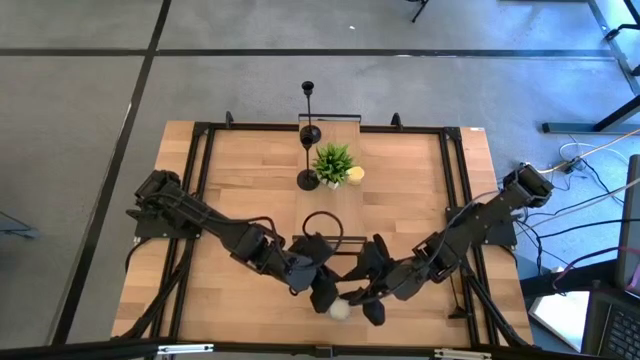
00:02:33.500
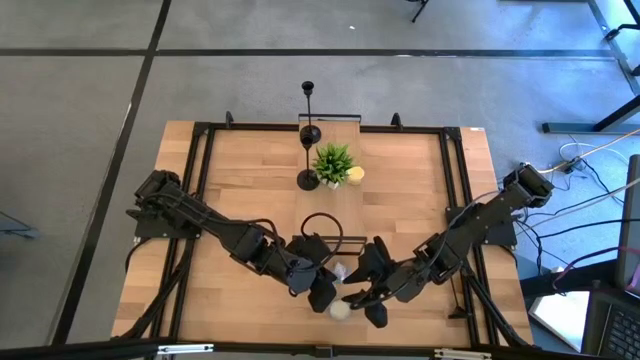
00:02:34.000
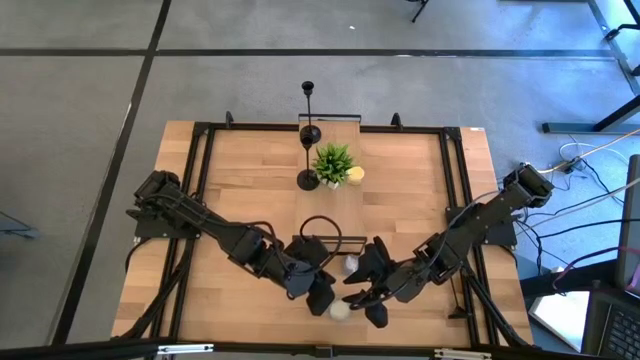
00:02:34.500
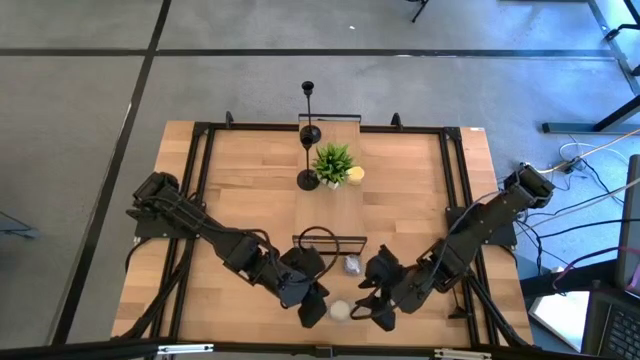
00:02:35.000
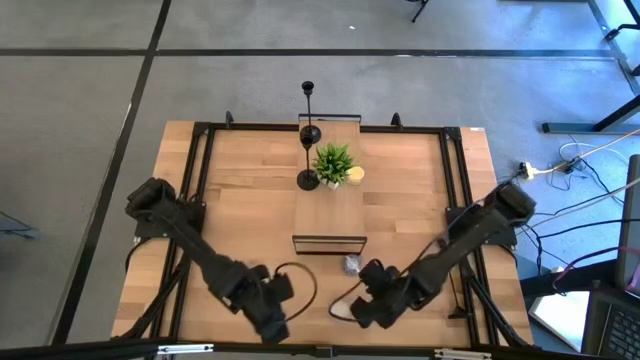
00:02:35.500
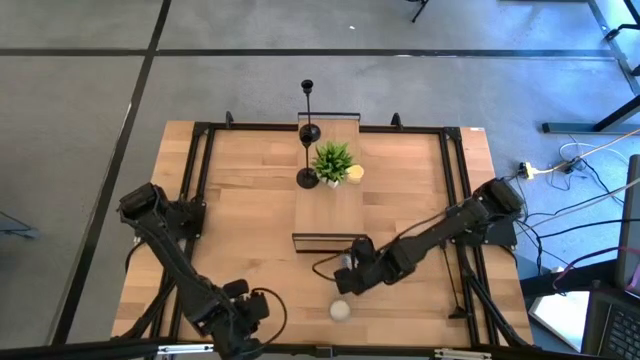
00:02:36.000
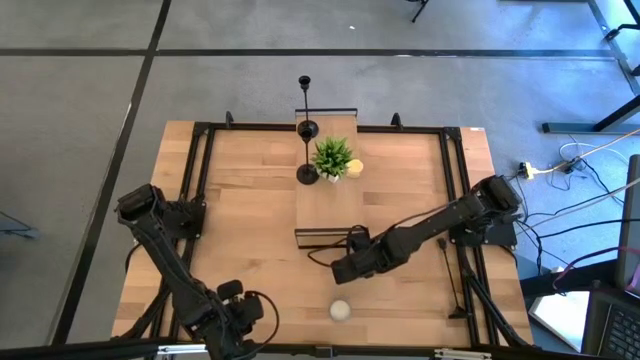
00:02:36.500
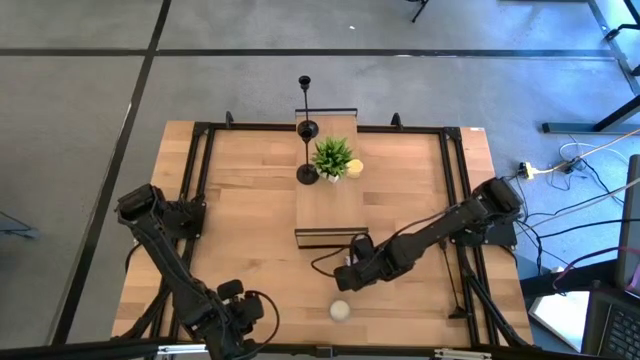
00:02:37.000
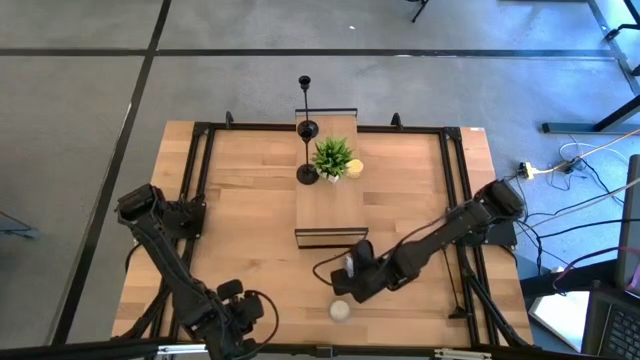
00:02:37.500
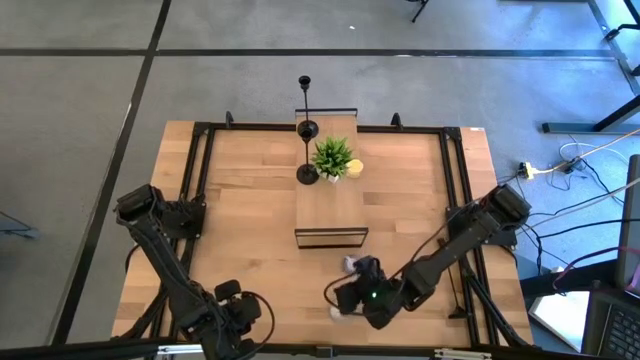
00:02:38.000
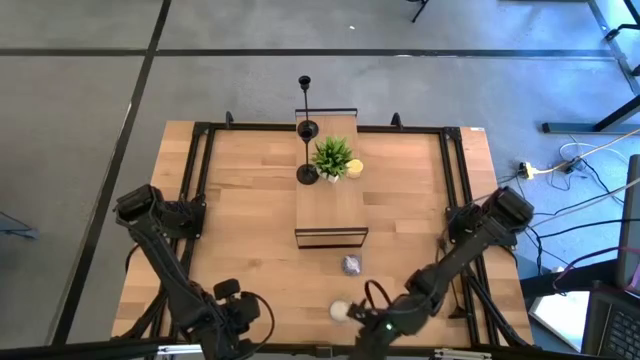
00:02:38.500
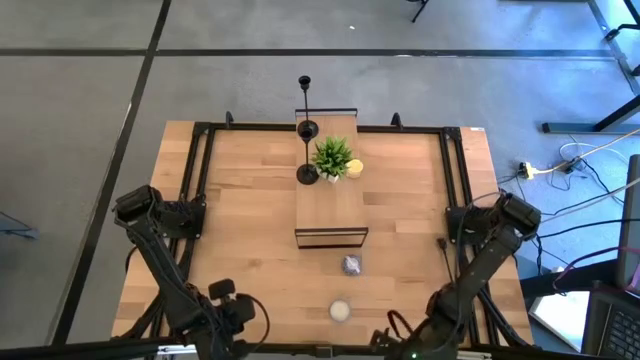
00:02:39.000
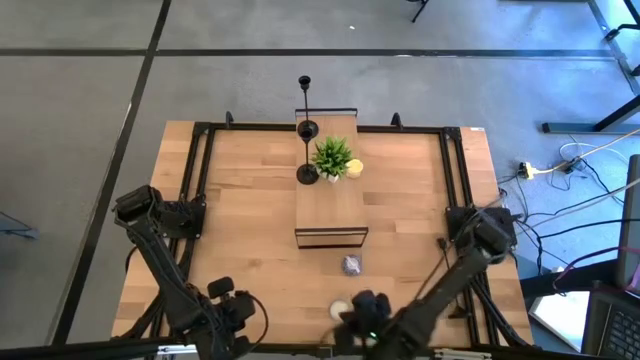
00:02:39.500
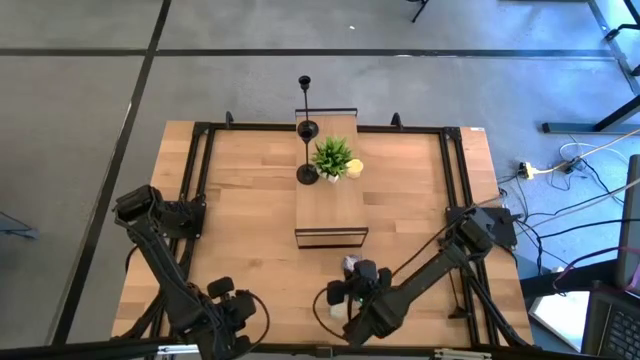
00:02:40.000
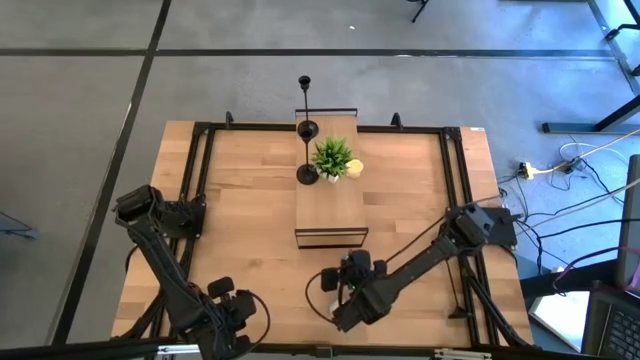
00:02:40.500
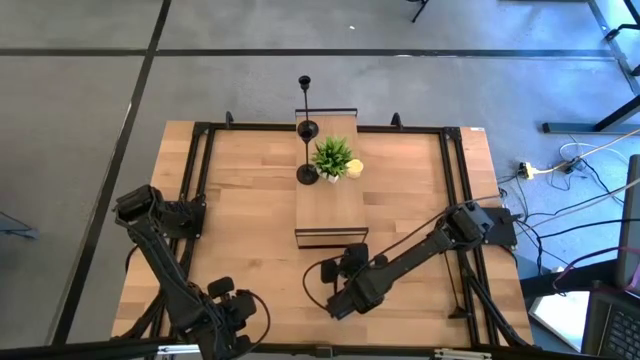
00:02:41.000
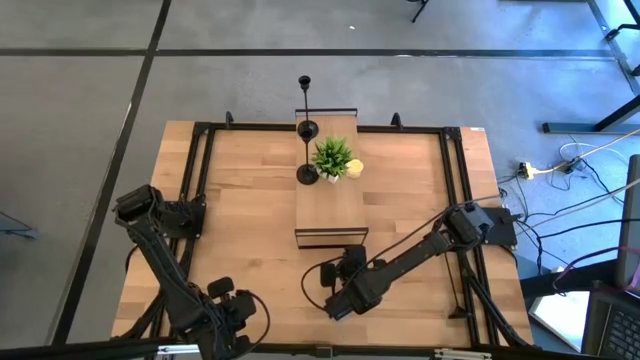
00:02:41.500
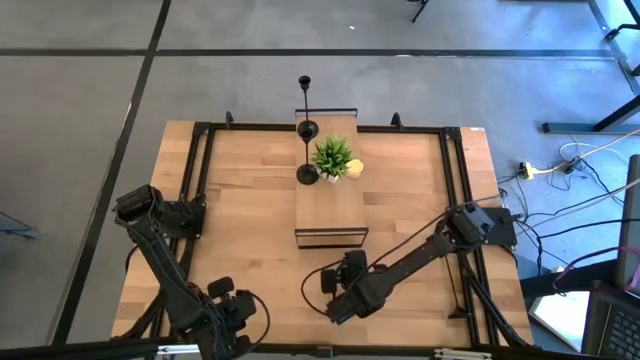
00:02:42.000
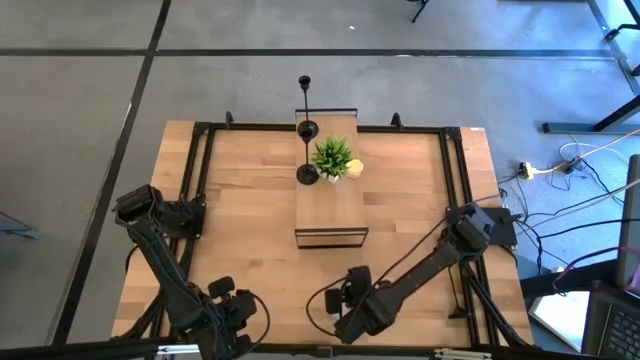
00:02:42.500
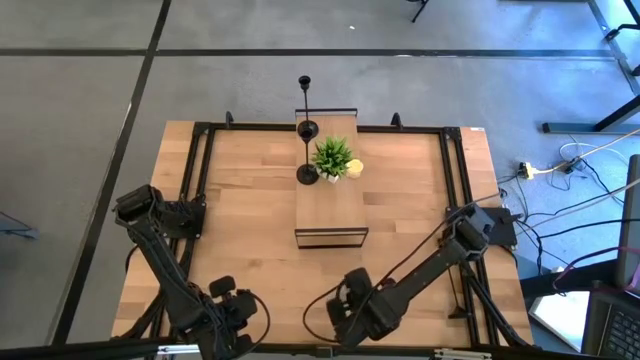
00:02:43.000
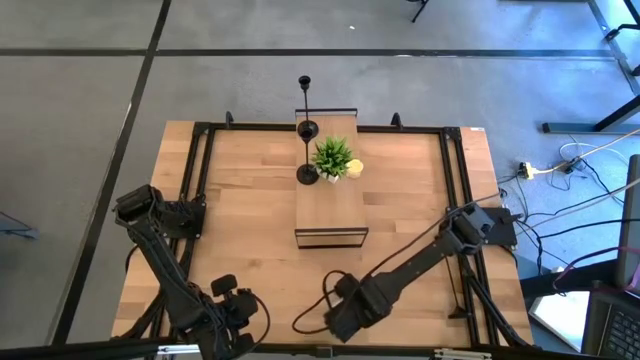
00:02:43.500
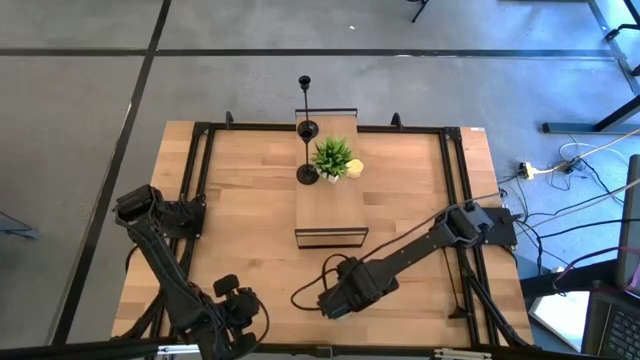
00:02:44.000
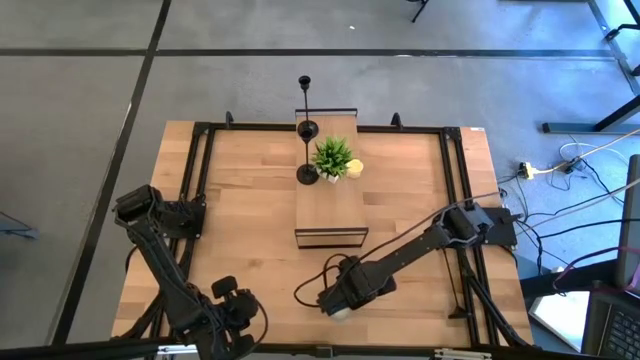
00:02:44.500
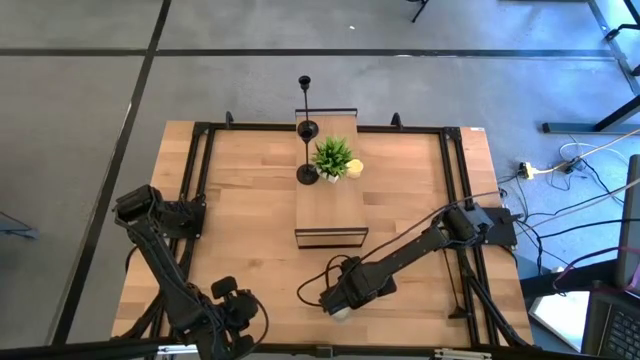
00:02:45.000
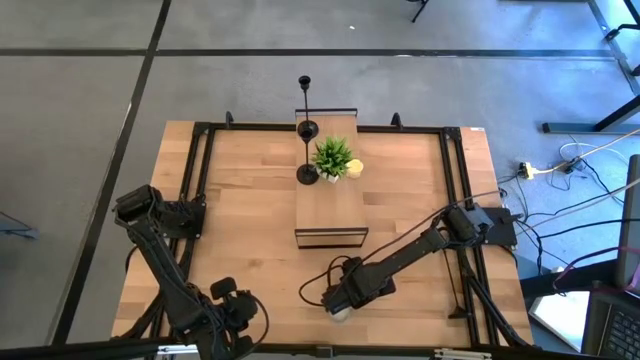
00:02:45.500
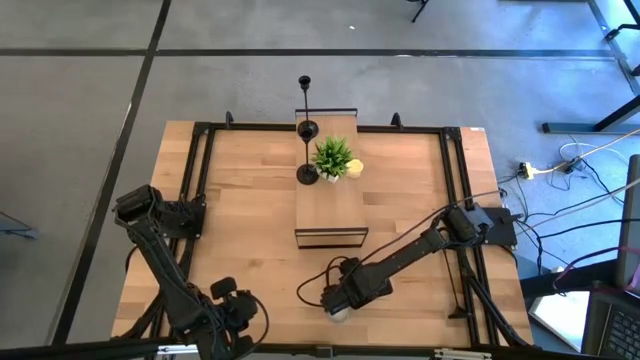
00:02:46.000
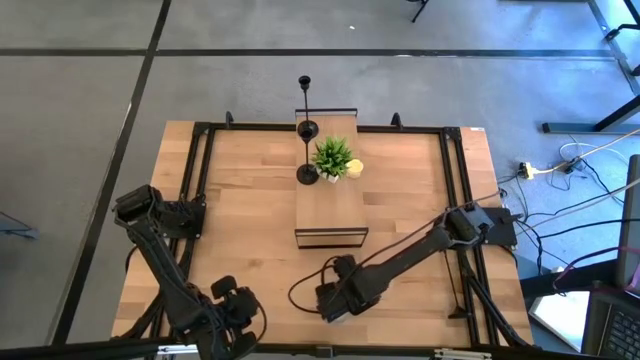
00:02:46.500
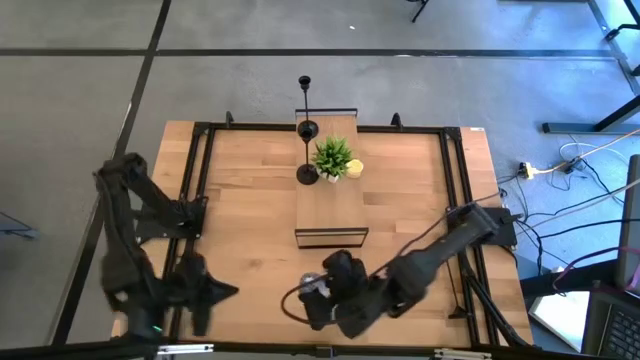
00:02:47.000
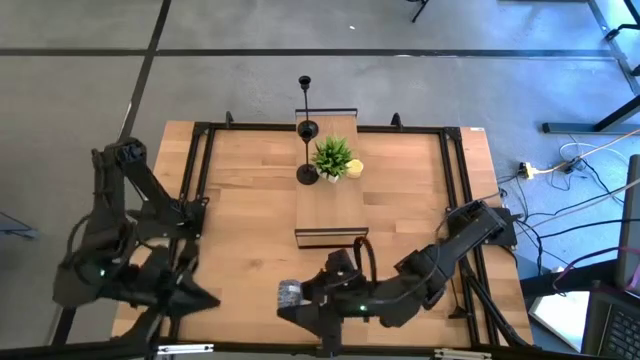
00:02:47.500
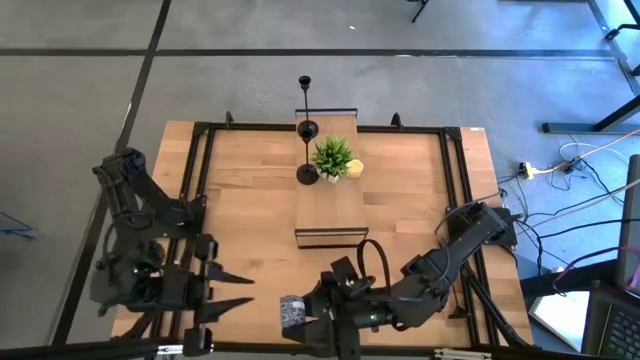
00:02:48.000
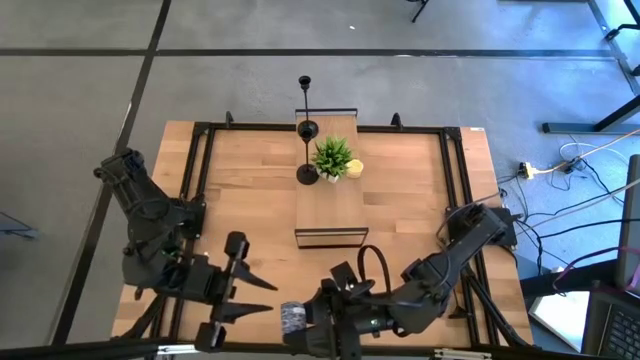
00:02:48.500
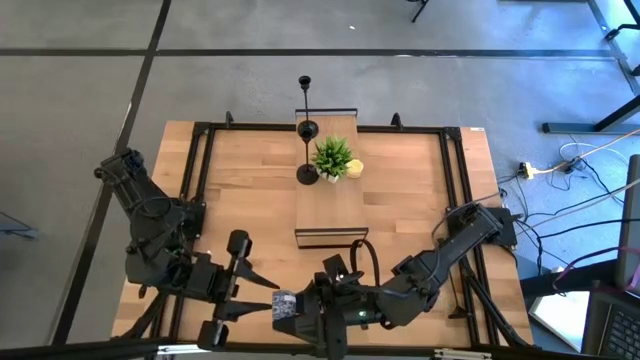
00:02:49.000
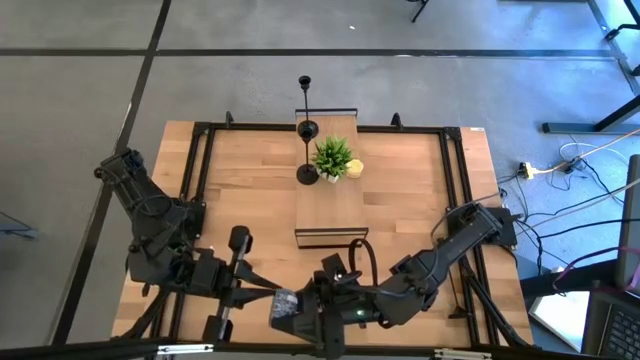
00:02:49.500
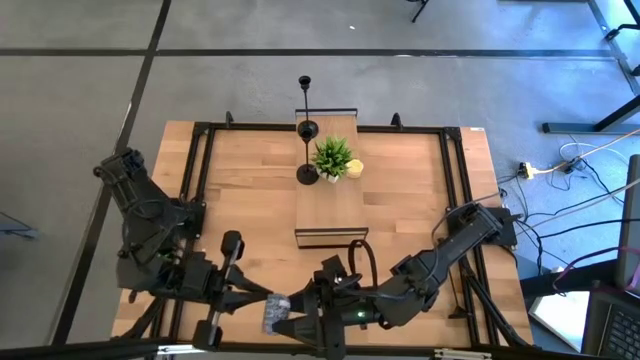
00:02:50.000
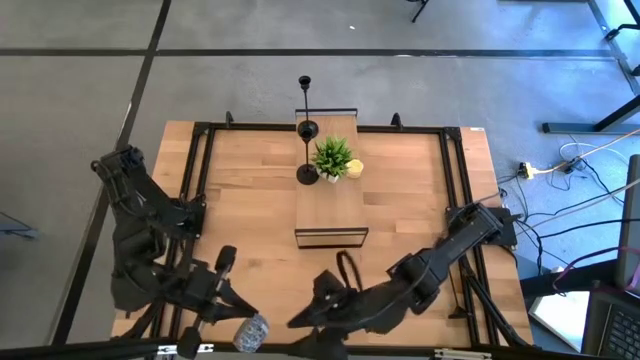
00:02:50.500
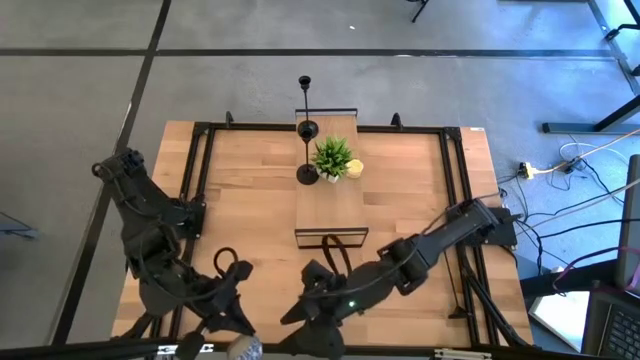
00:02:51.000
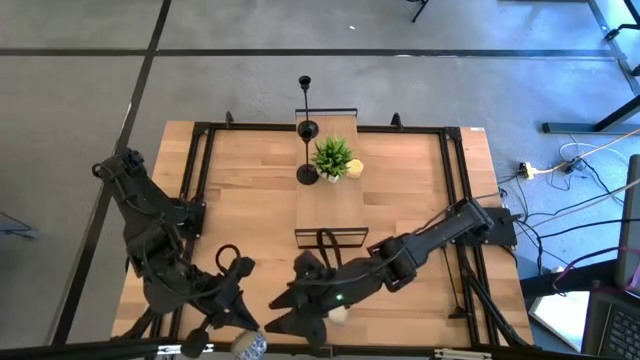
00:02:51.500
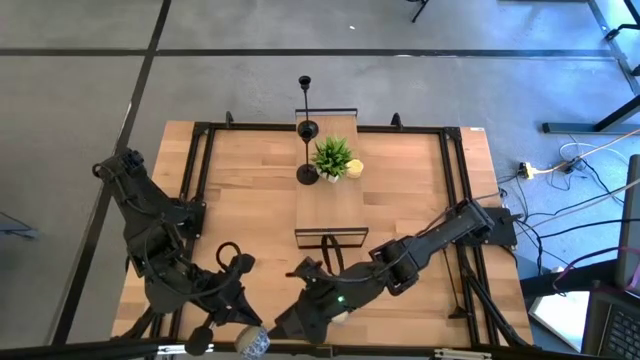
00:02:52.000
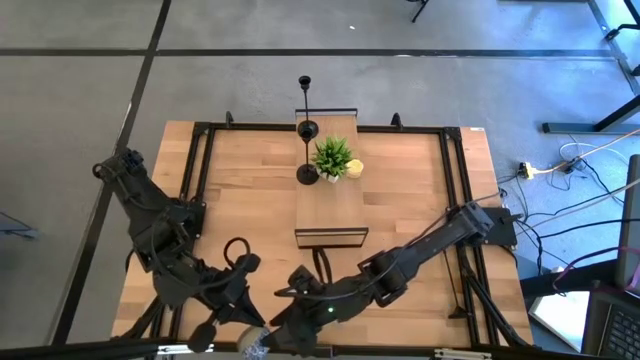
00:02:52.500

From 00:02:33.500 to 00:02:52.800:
Task: Pick & Place candle stick holders
Put the top blue scented candle on the shelf

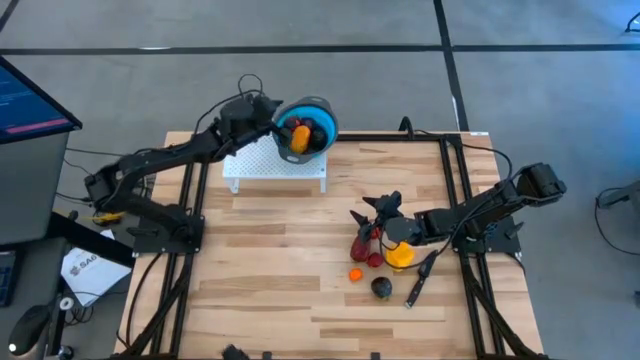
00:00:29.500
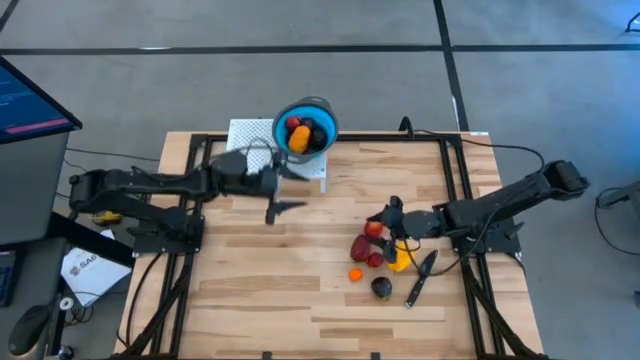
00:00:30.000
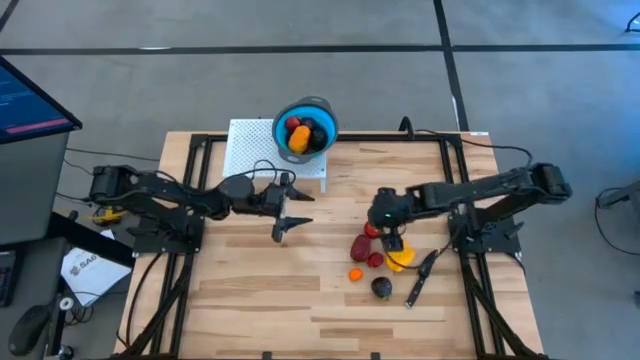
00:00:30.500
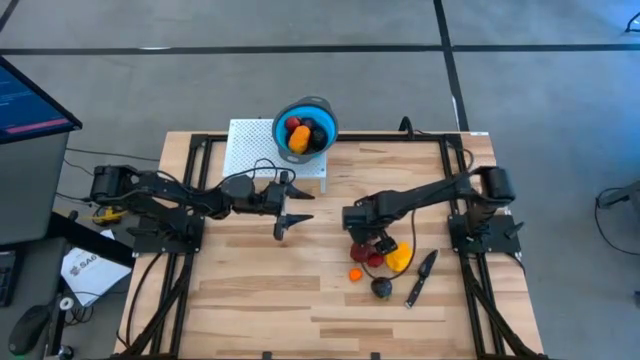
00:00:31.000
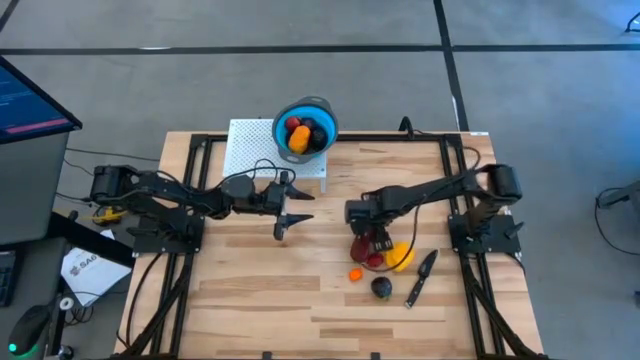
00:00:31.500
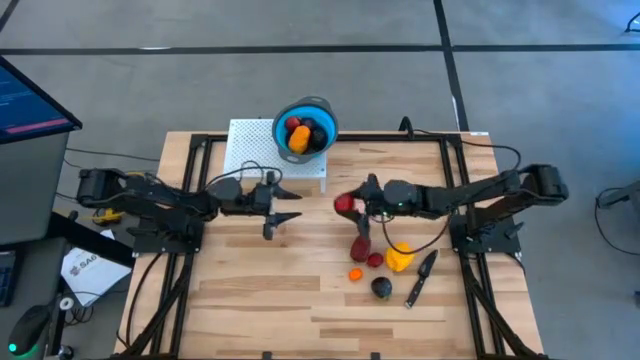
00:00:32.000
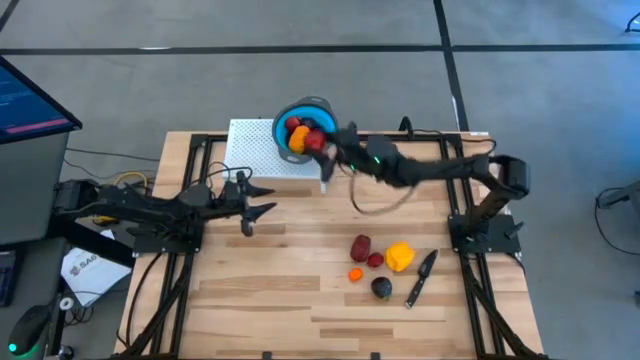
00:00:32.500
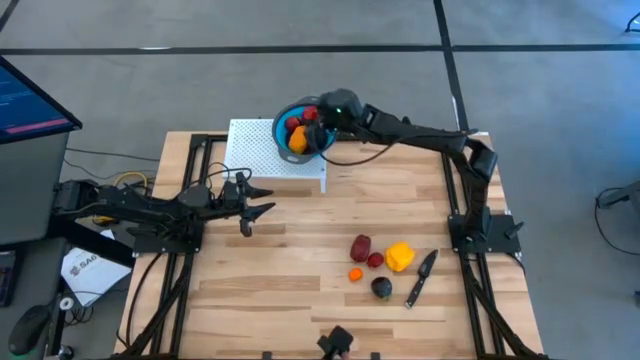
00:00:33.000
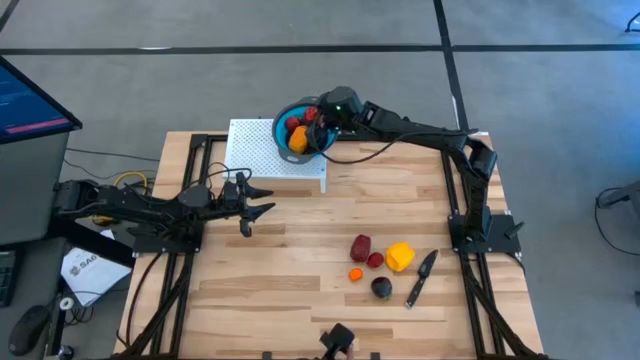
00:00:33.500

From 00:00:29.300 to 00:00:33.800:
Task: Pick & Place Fruit
Put the red and yellow apple into the blue strainer bowl
